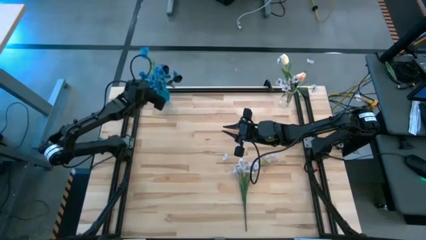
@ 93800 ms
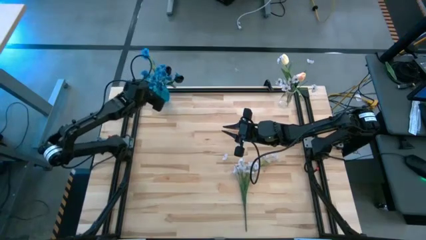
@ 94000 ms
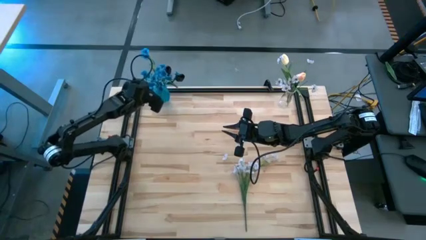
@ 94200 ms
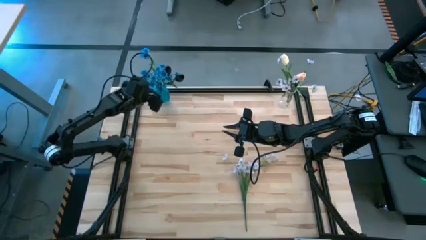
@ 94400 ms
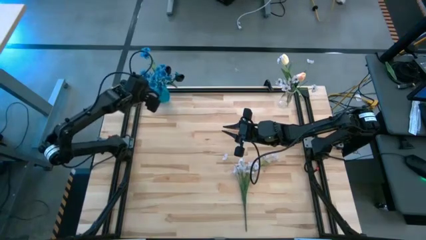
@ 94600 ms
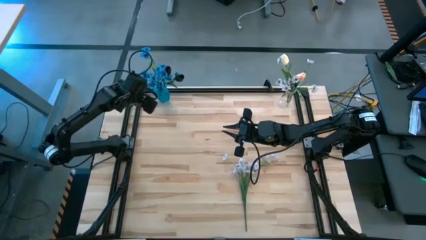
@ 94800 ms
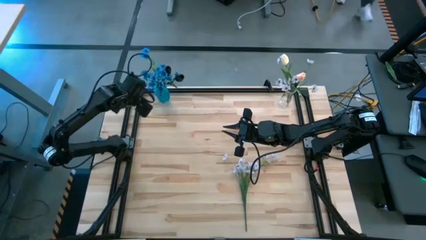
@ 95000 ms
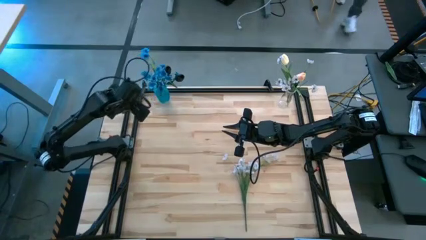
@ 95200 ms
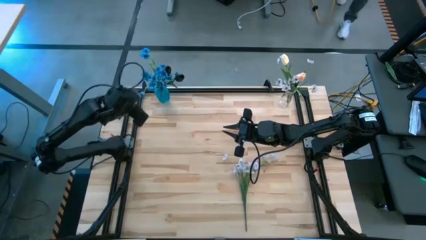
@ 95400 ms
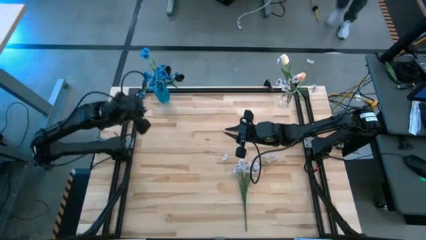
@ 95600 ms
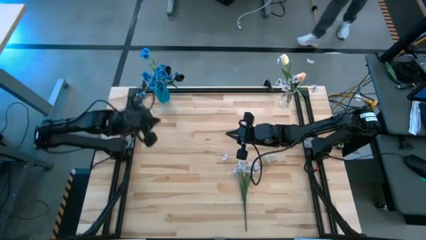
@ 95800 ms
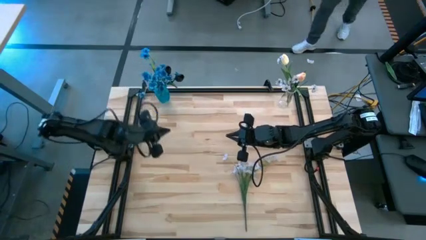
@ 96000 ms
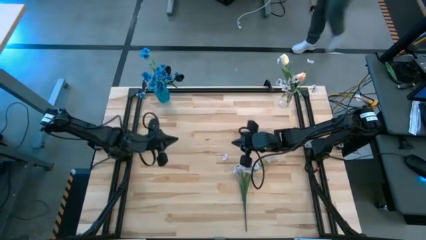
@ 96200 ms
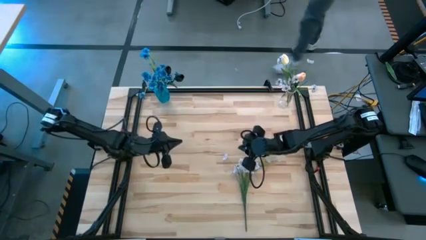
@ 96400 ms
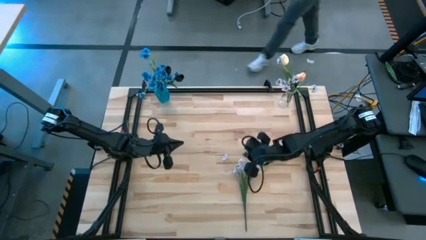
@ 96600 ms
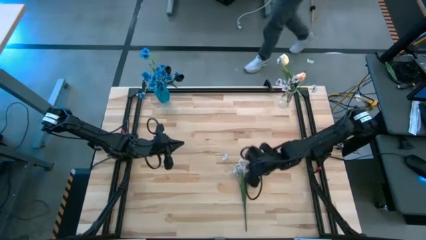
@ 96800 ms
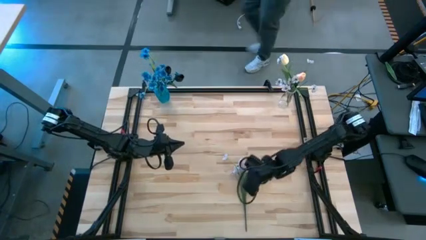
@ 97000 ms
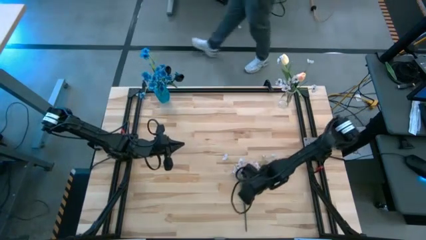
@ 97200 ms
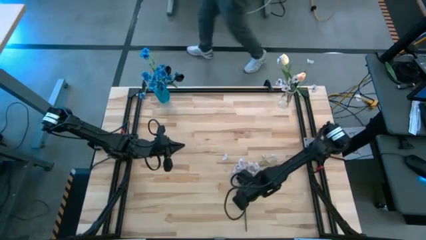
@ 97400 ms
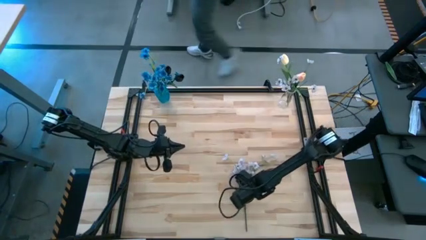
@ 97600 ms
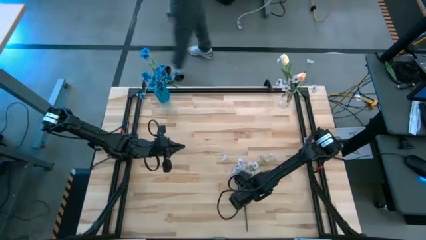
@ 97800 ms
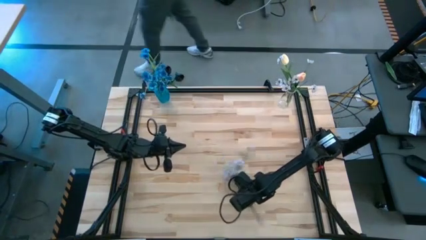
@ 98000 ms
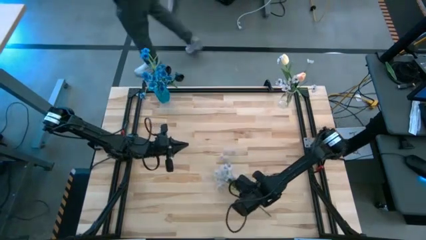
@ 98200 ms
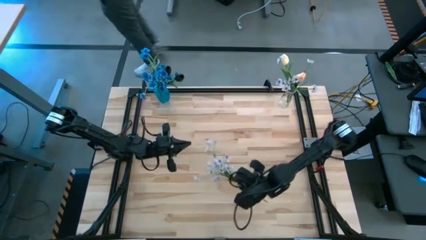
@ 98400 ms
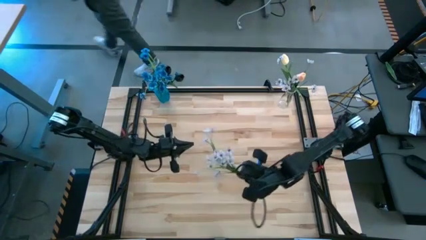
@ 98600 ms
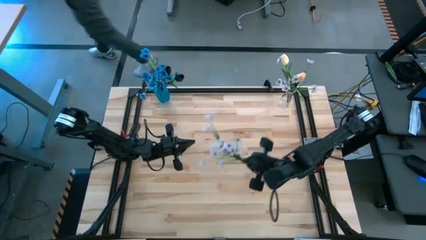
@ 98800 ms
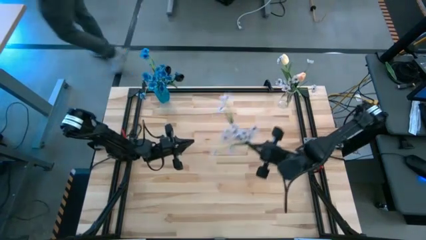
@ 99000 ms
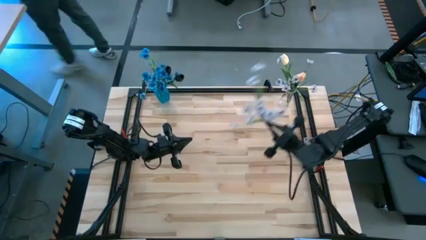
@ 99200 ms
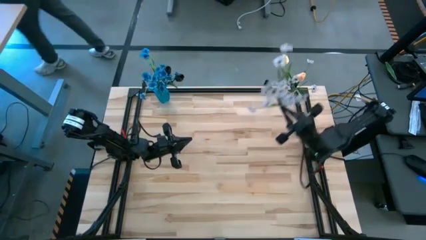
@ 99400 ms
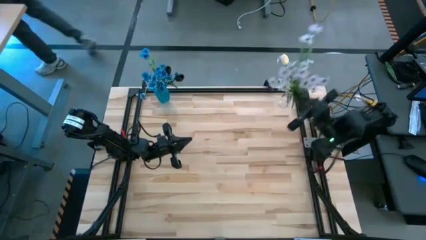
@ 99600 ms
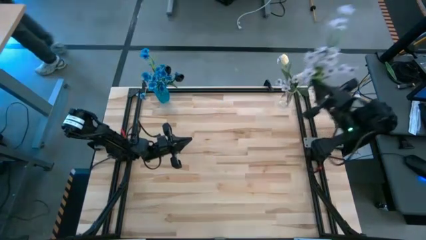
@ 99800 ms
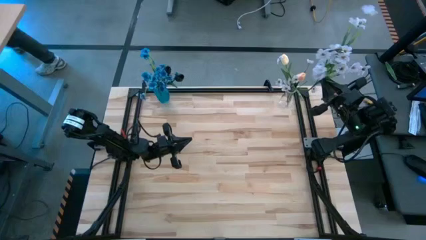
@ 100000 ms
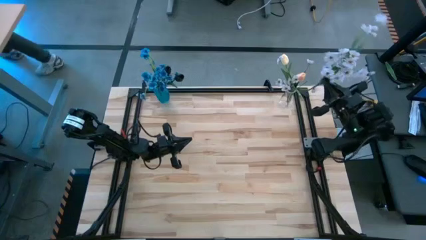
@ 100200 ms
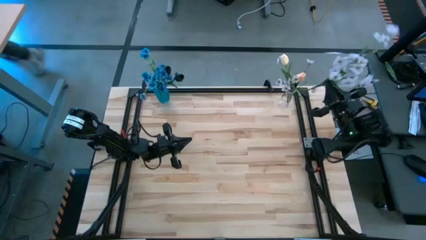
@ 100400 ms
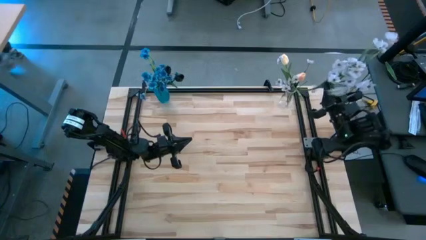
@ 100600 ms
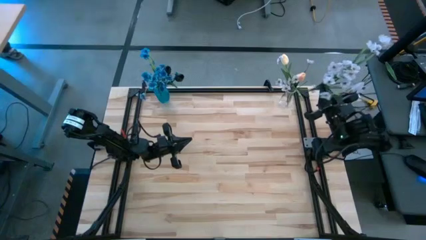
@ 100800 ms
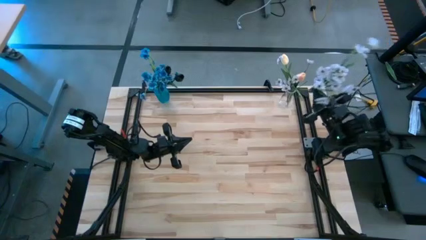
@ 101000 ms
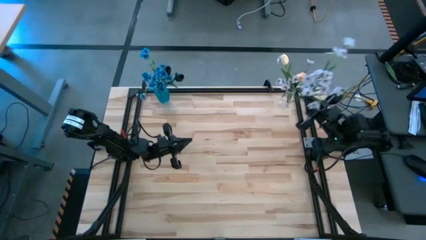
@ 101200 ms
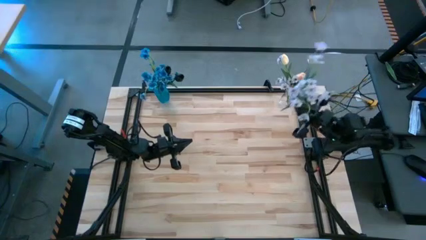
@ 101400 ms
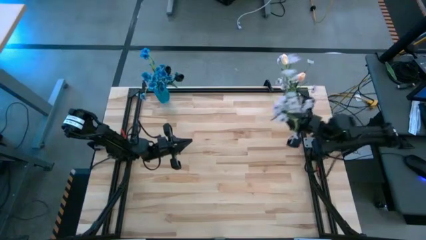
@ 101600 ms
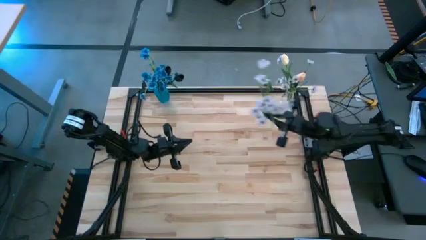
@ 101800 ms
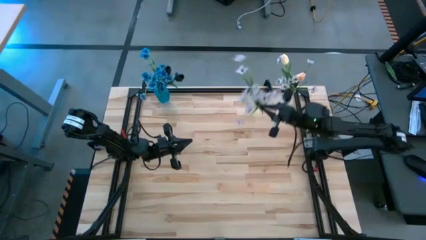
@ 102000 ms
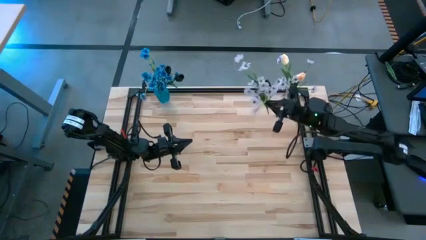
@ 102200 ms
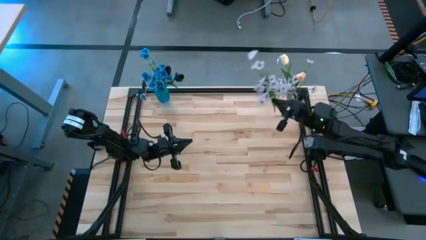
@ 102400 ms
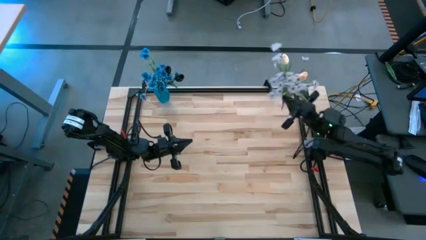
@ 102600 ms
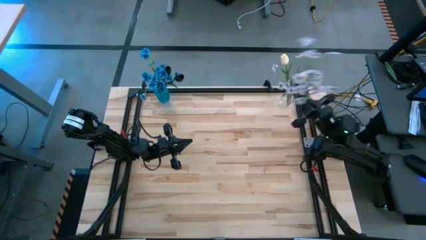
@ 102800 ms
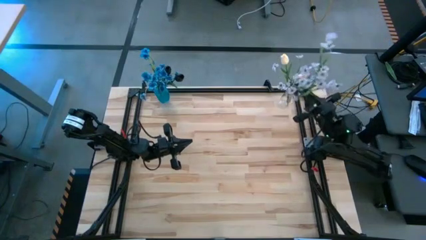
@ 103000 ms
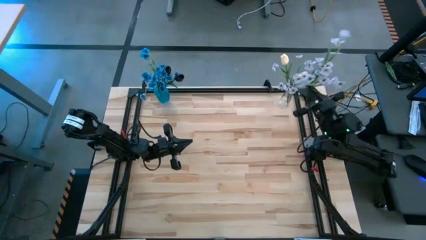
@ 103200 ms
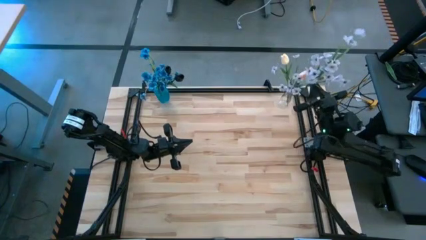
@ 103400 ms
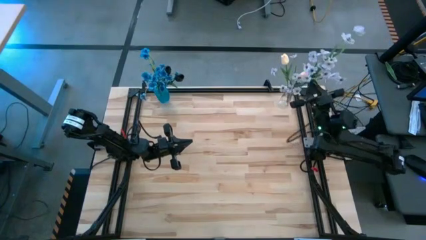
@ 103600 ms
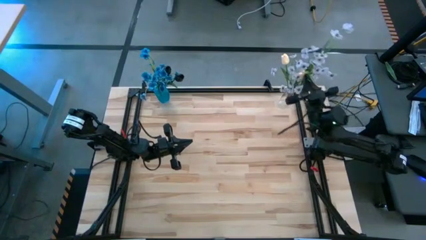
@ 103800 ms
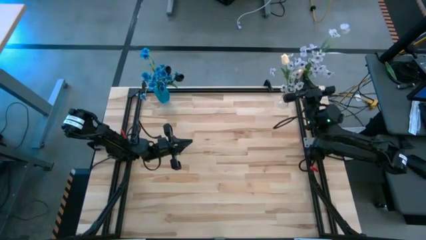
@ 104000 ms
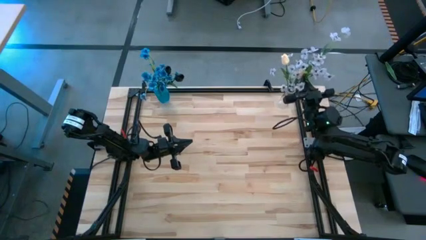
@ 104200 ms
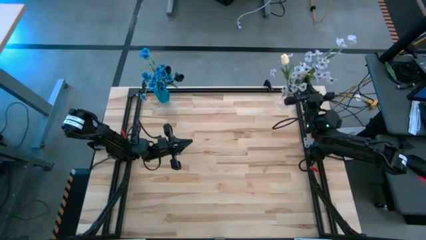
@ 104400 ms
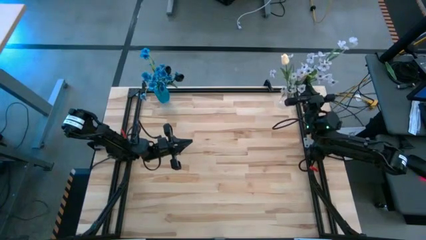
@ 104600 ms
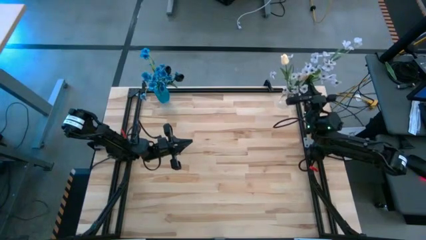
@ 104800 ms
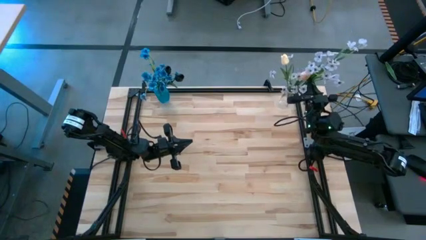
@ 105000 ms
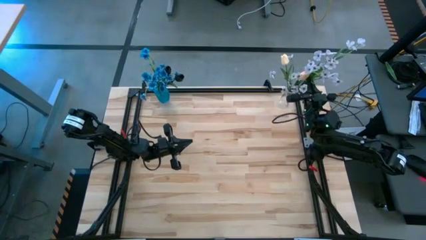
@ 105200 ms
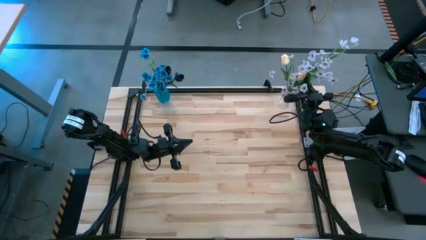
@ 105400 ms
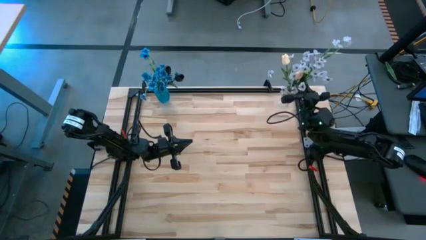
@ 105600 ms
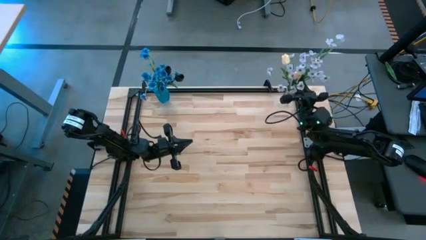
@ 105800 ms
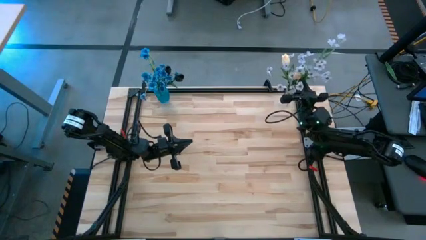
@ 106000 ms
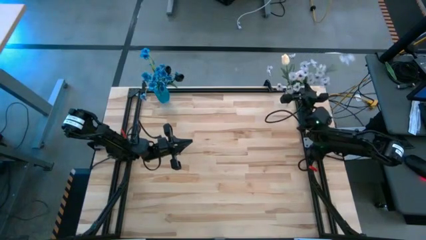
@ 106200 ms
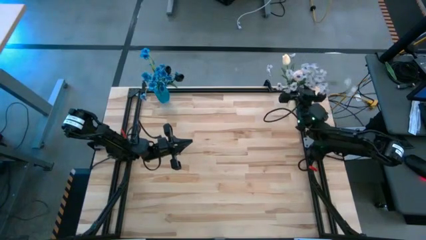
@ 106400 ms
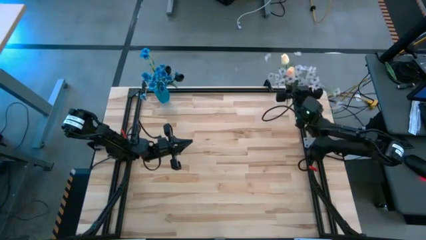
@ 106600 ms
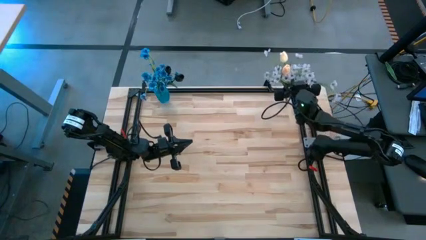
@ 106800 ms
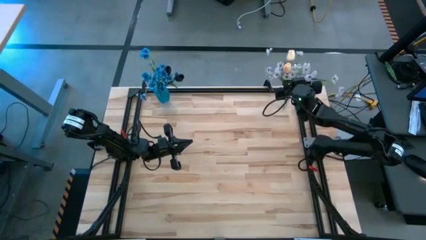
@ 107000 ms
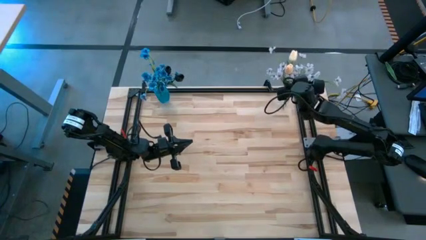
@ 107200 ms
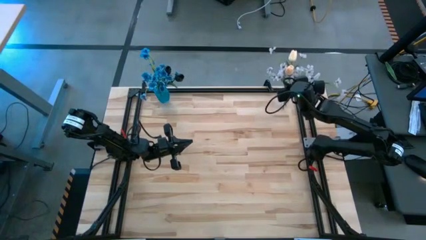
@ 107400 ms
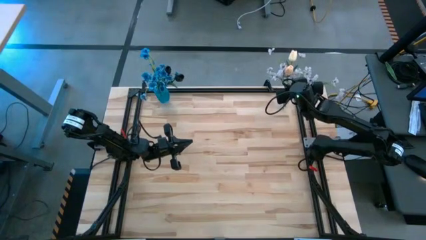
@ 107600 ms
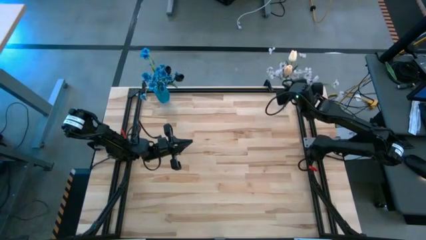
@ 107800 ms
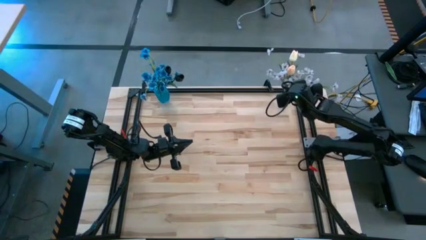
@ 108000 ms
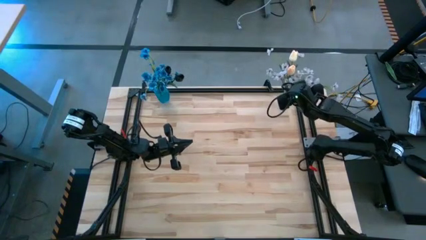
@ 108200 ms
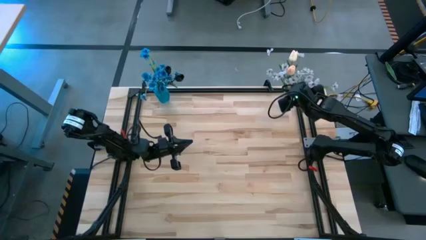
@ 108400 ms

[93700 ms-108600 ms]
Task: Sort flowers into vase by color
Put the white flowers into the transparent vase
